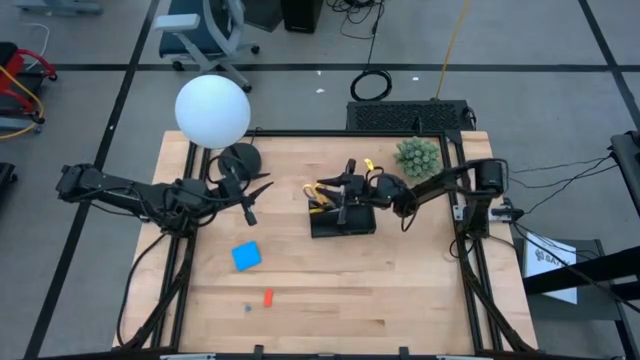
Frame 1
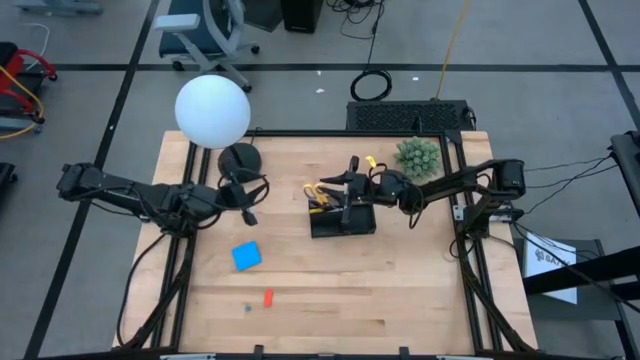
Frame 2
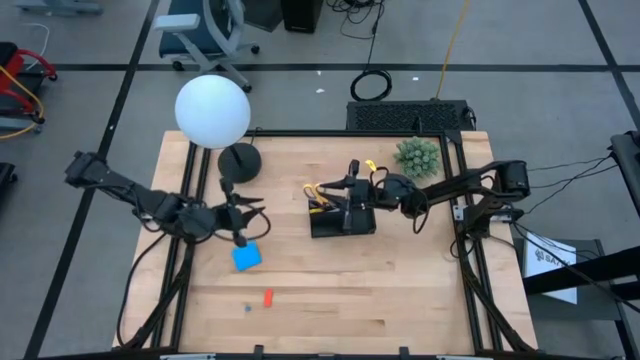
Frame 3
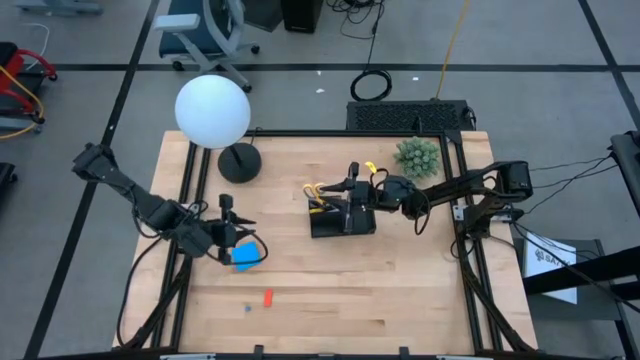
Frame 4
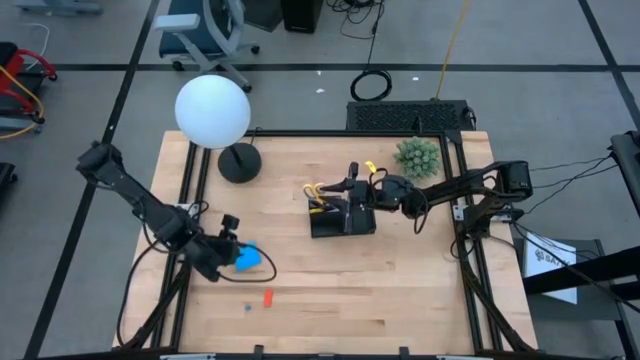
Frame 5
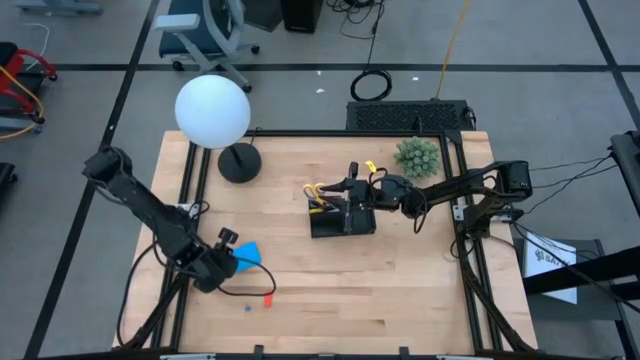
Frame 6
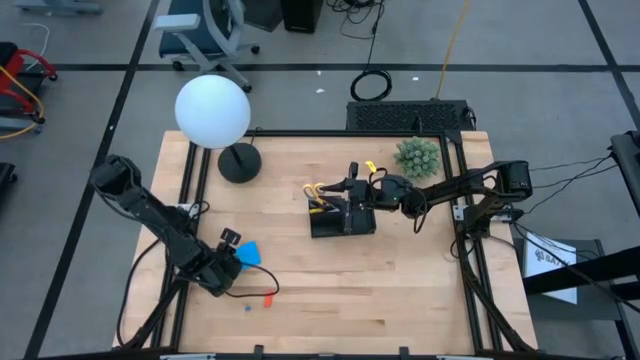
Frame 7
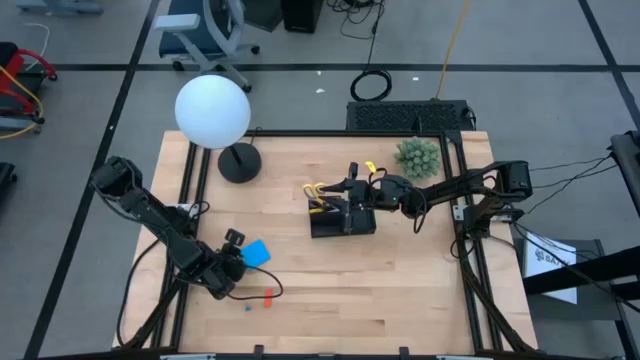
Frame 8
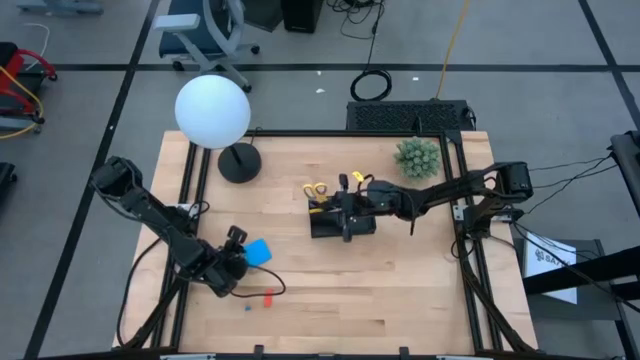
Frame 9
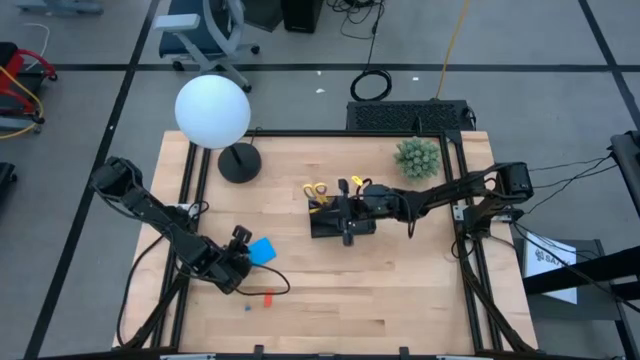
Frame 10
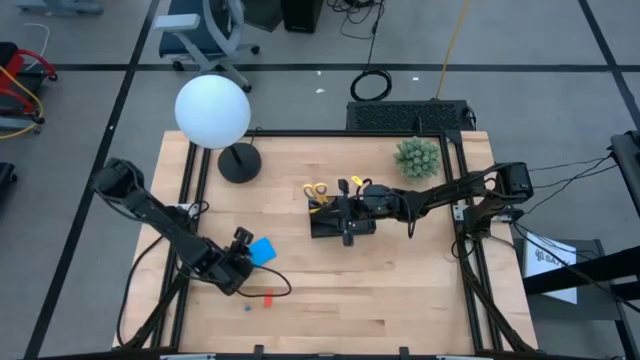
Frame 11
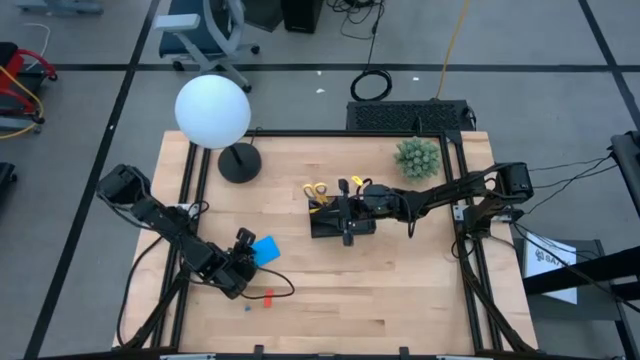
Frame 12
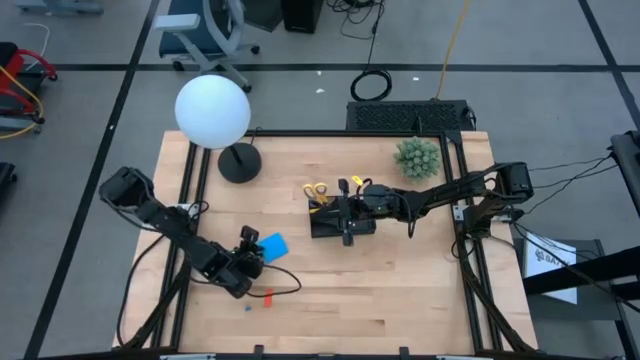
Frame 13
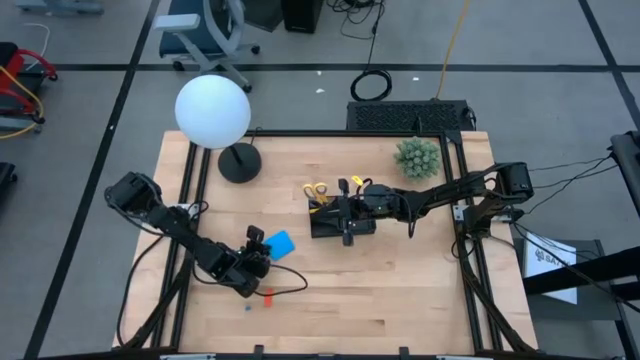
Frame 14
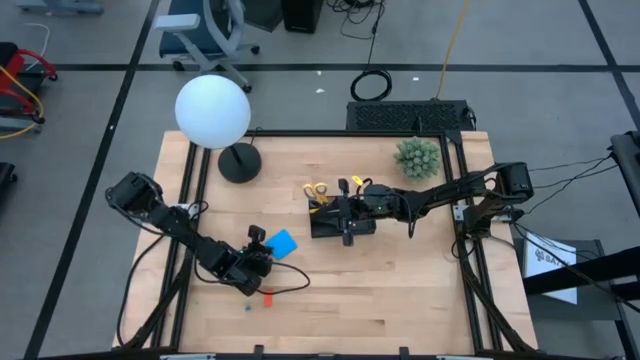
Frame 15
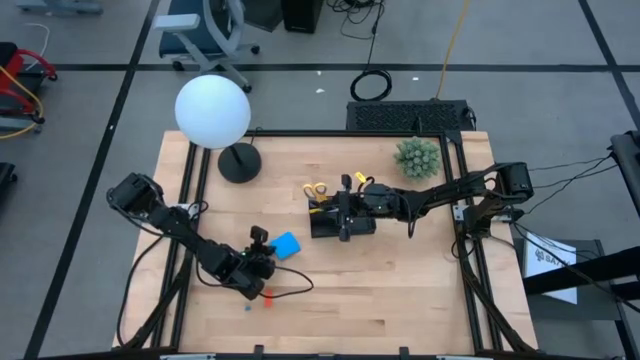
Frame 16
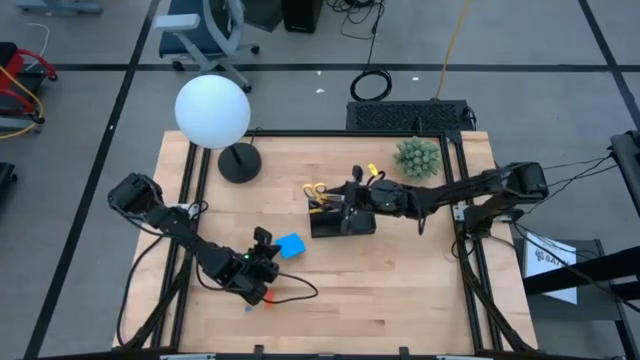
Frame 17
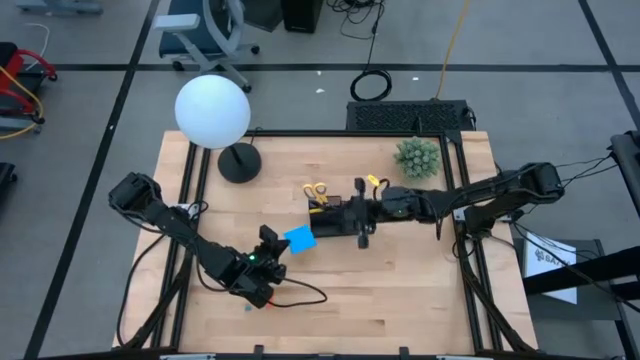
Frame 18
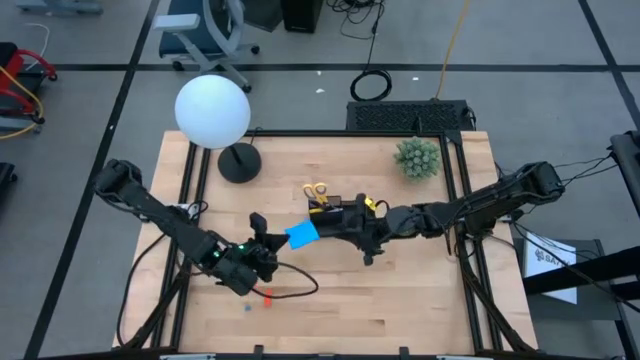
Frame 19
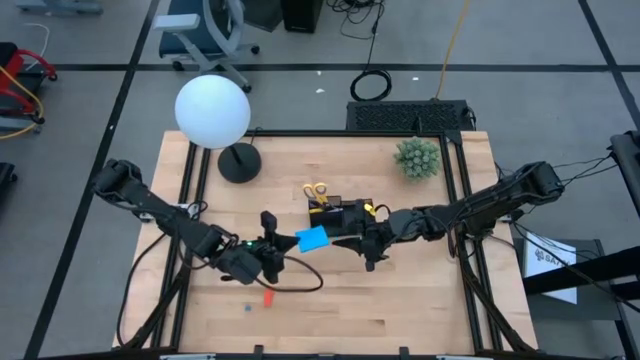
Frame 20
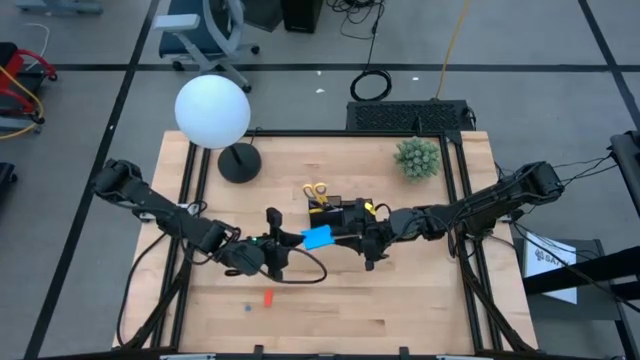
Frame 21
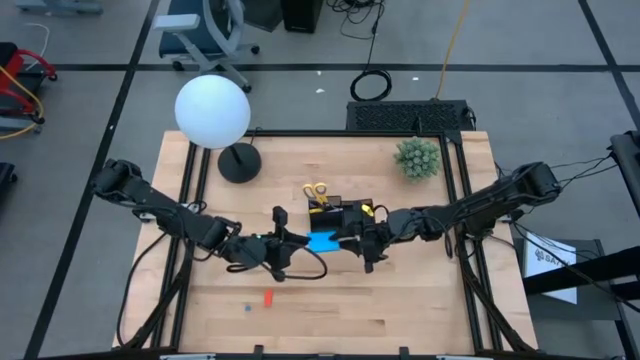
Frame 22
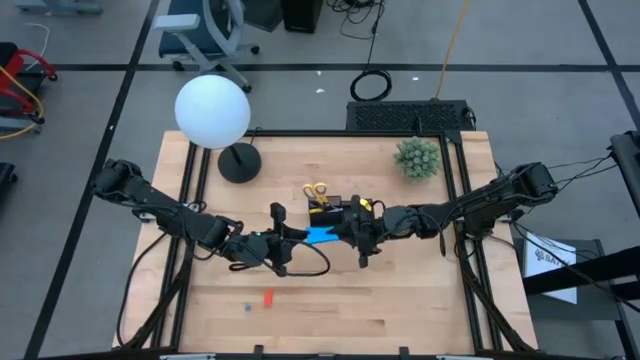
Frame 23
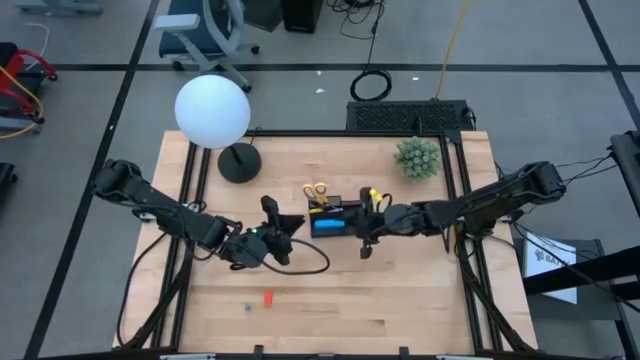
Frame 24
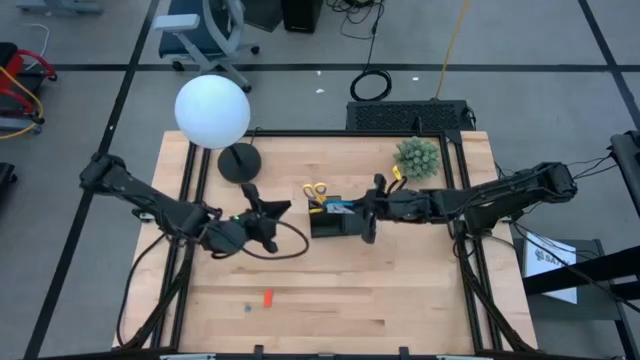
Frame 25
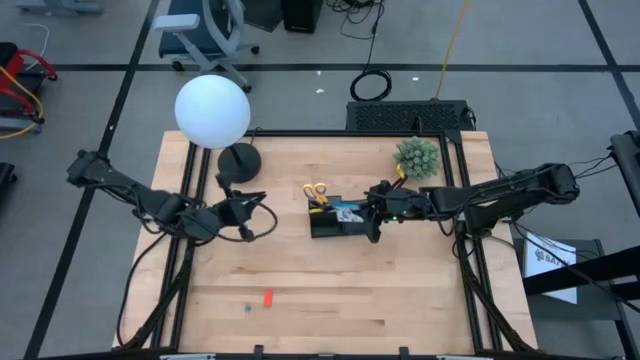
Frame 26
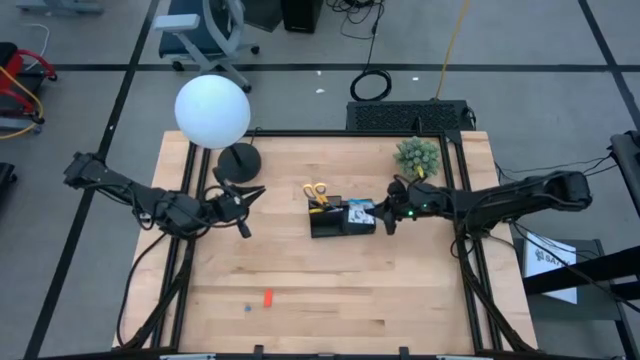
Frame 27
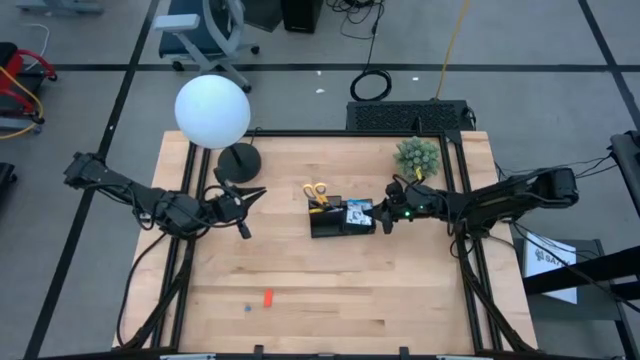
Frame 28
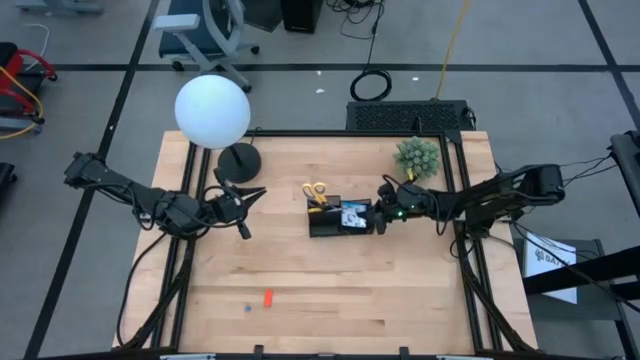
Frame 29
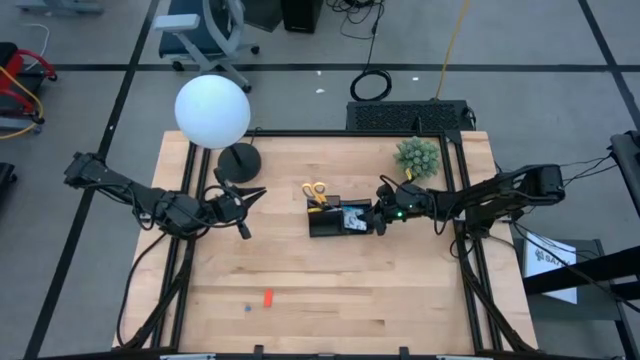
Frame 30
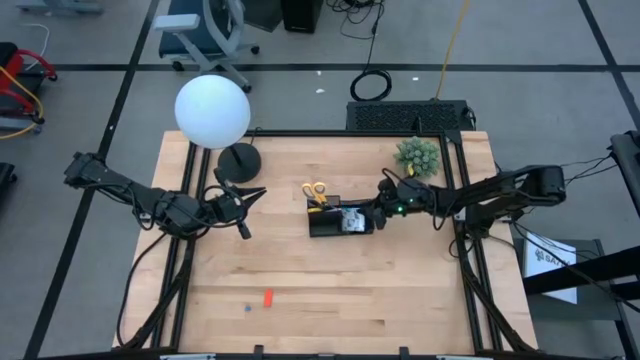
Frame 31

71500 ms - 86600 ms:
Task: Pick and place office supplies into organizer
Put the blue sticky notes into the right compartment of the black desk organizer

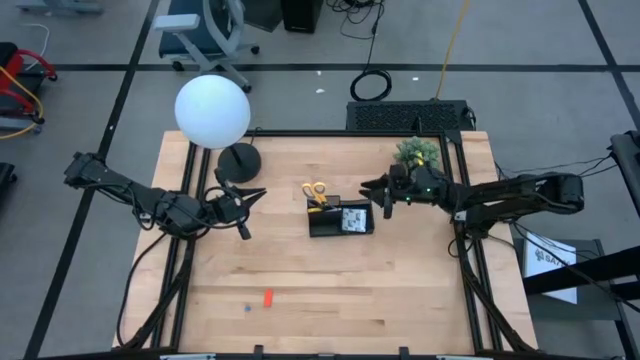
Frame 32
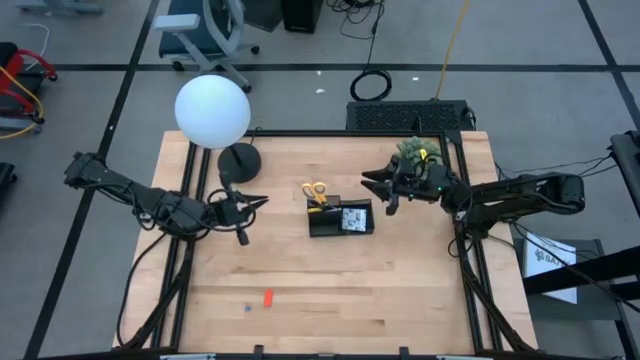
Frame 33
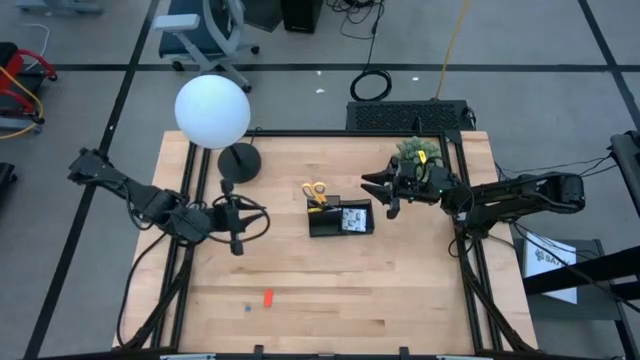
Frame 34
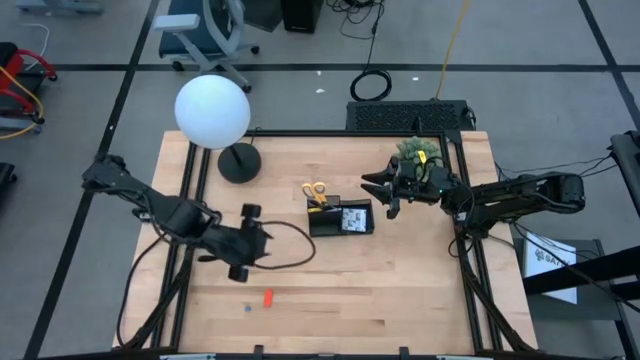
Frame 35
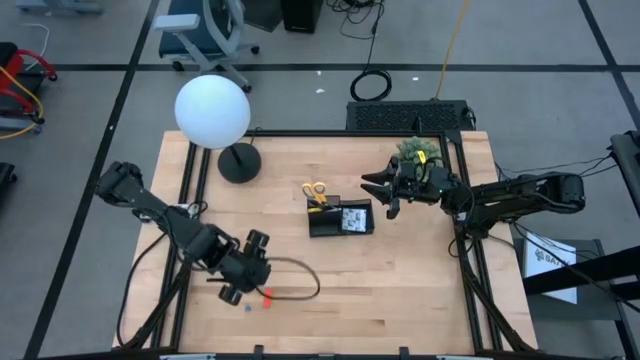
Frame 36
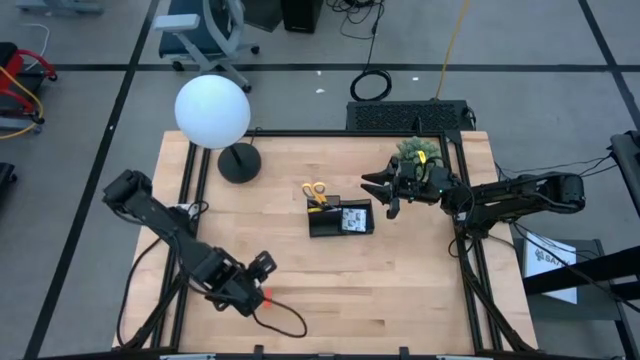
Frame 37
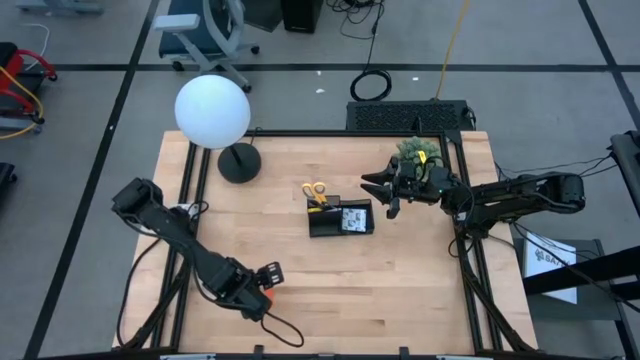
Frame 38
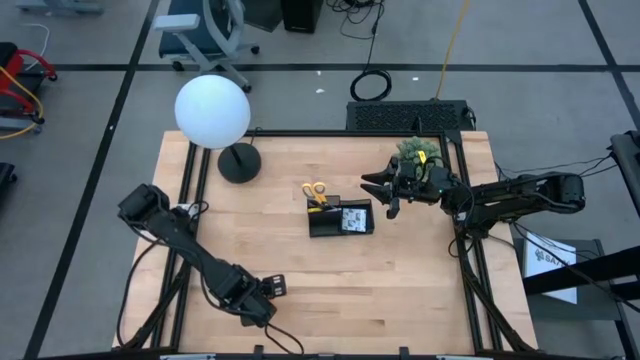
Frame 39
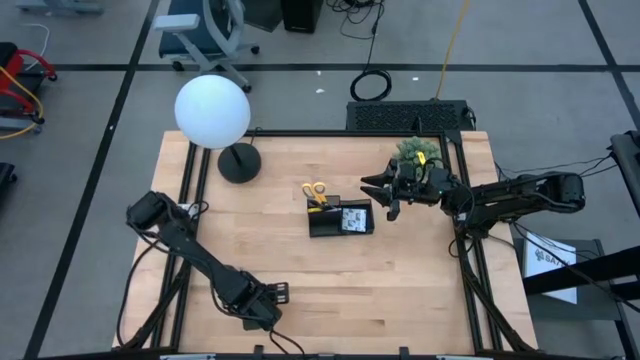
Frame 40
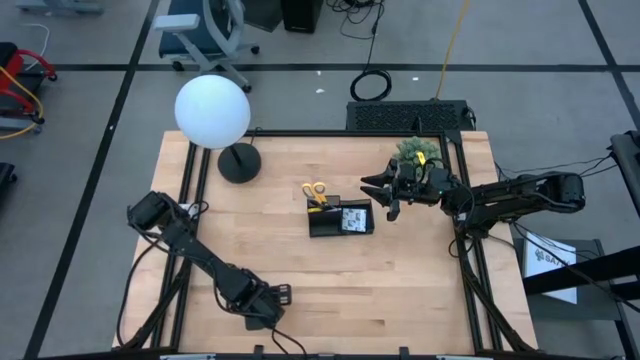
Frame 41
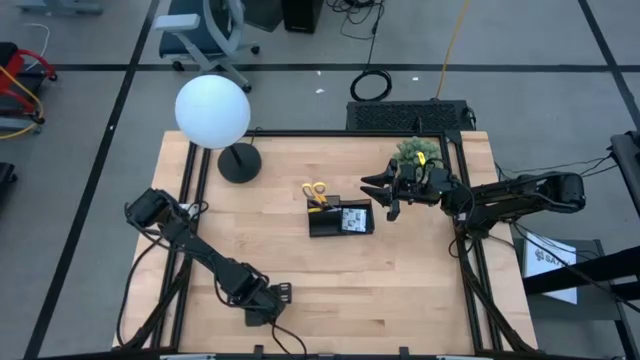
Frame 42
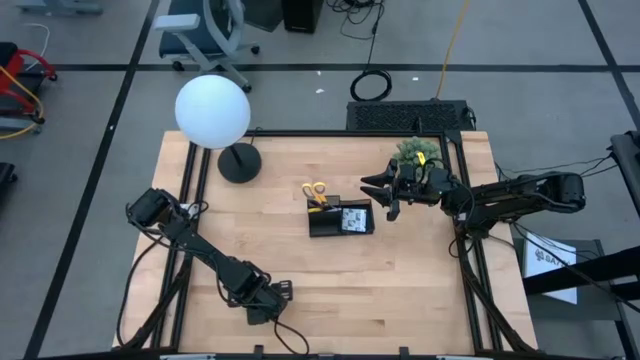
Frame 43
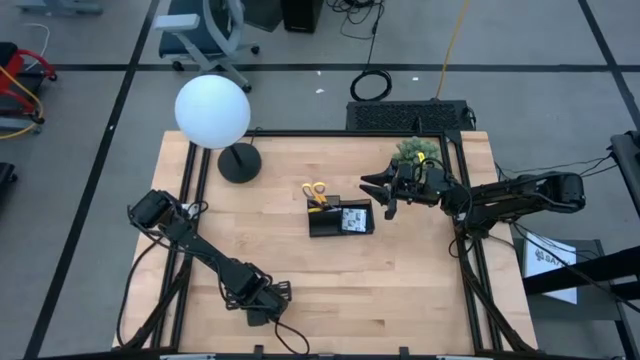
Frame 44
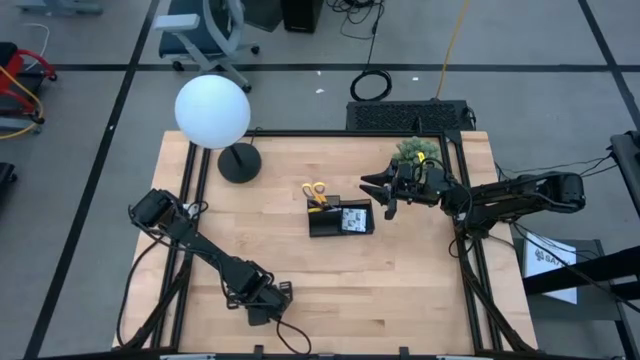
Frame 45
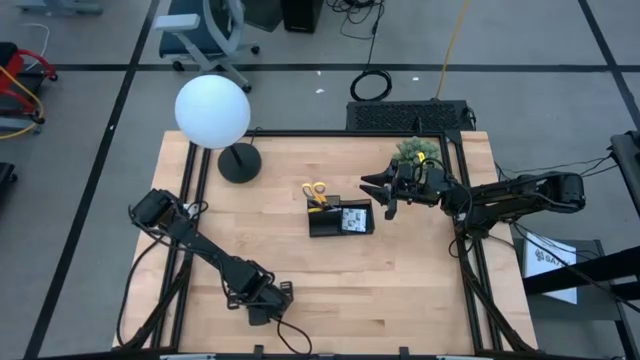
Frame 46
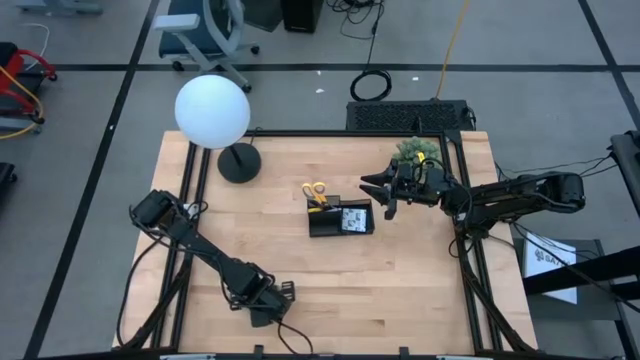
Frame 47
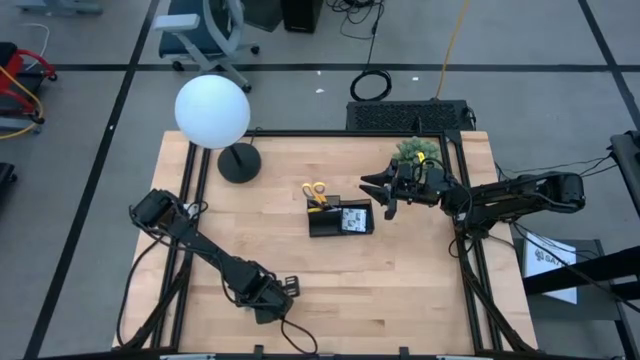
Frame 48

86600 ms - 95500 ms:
Put the orange eraser into the bottom left compartment of the black desk organizer
